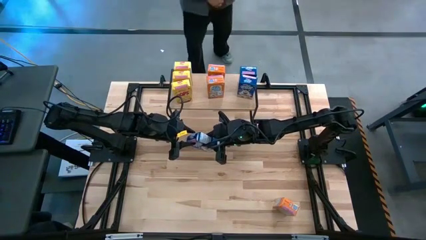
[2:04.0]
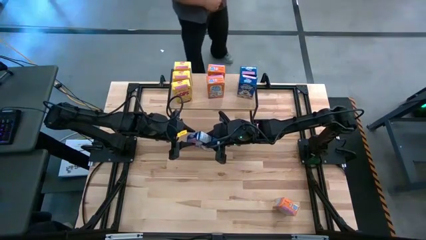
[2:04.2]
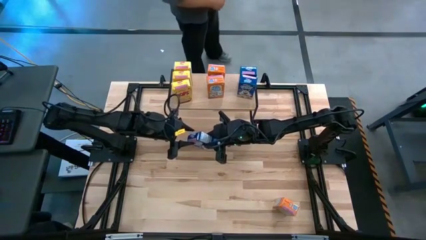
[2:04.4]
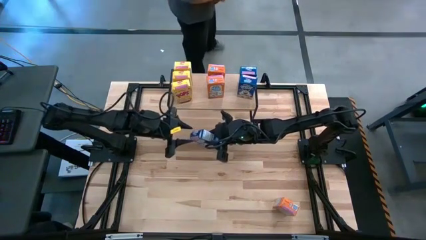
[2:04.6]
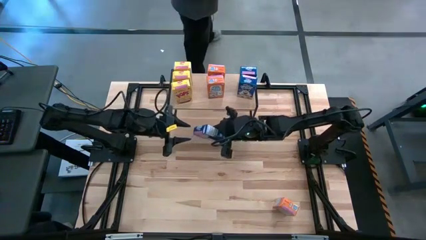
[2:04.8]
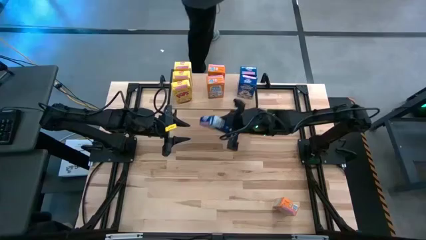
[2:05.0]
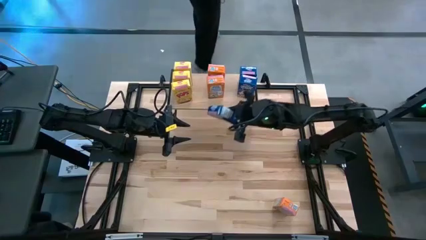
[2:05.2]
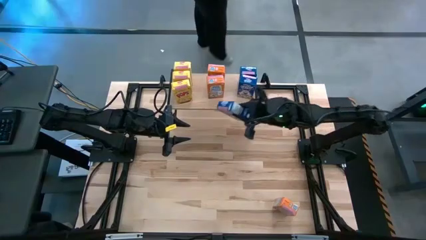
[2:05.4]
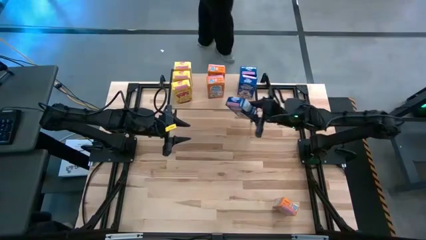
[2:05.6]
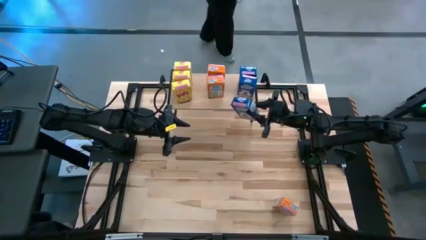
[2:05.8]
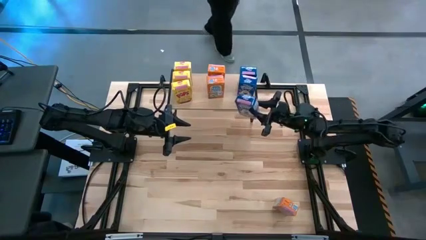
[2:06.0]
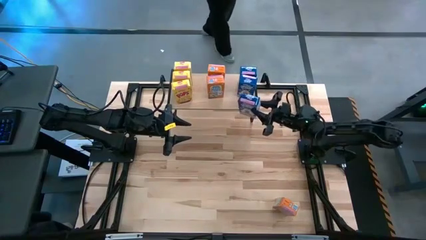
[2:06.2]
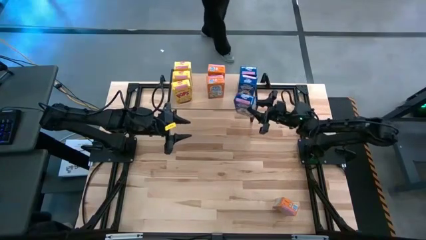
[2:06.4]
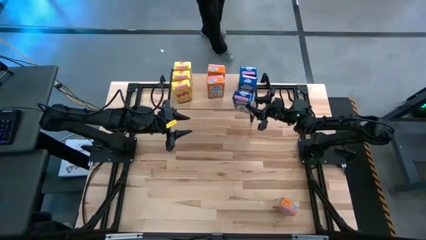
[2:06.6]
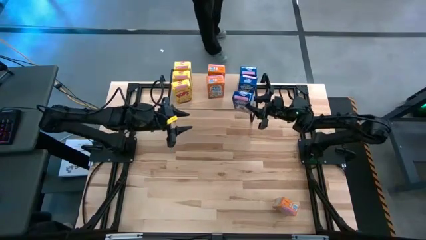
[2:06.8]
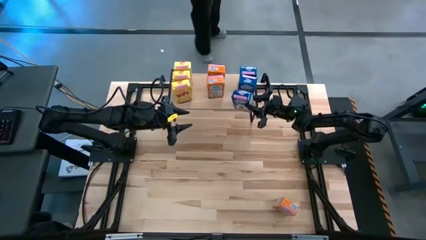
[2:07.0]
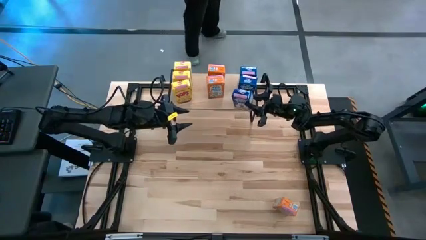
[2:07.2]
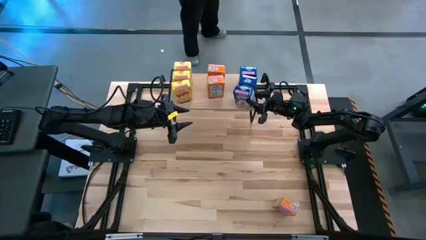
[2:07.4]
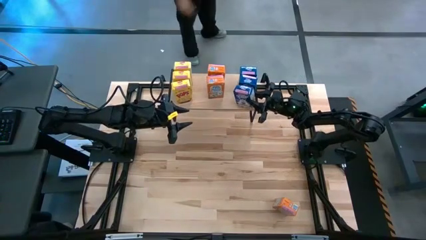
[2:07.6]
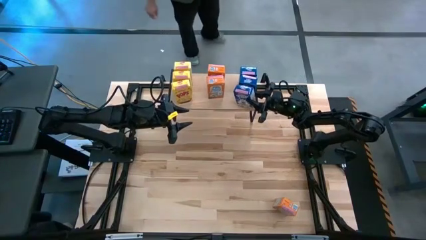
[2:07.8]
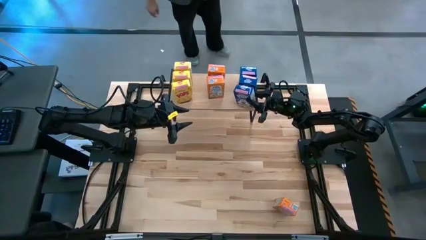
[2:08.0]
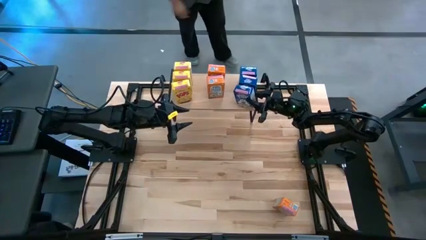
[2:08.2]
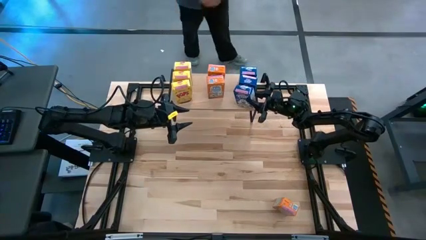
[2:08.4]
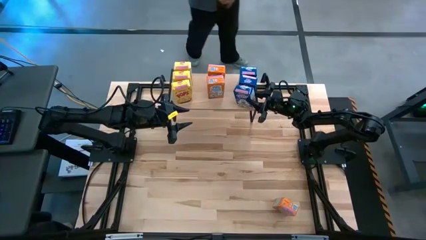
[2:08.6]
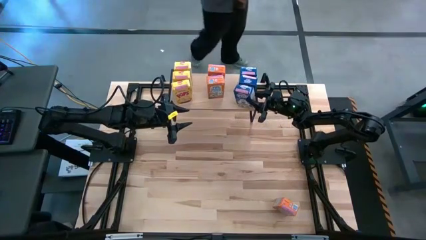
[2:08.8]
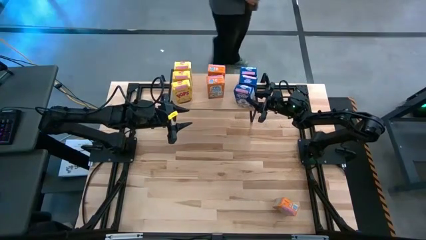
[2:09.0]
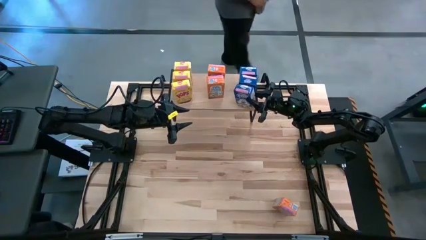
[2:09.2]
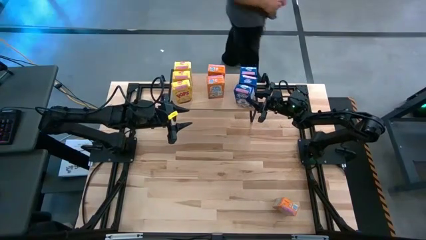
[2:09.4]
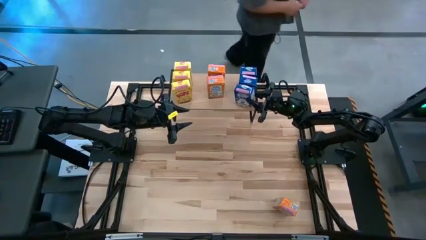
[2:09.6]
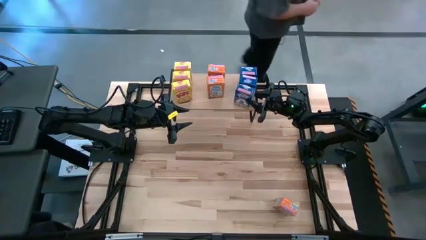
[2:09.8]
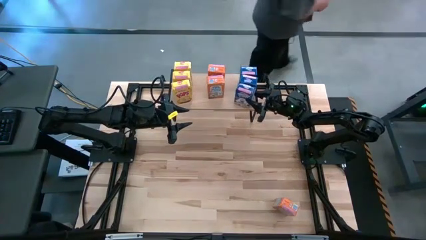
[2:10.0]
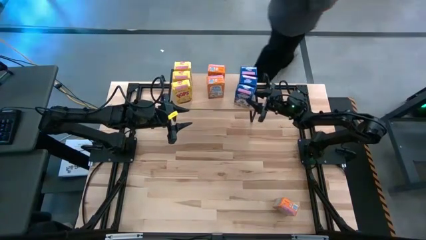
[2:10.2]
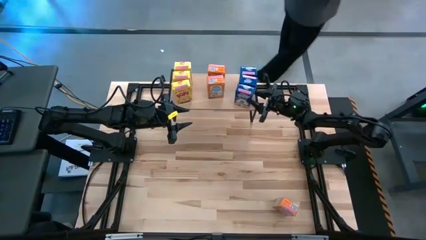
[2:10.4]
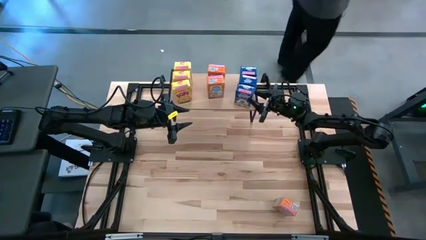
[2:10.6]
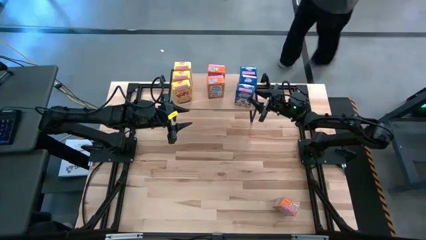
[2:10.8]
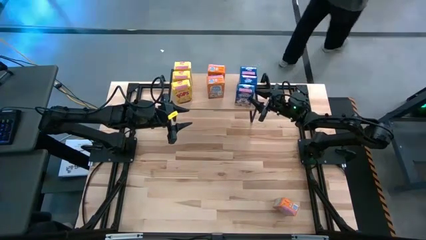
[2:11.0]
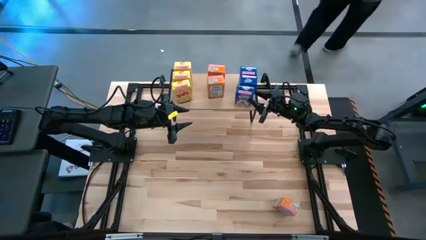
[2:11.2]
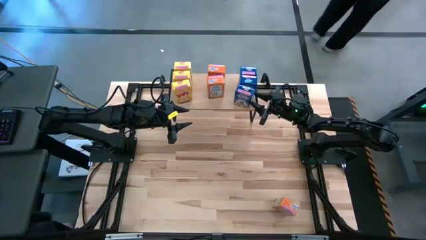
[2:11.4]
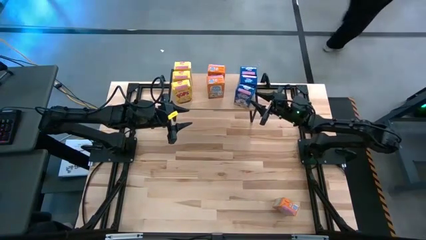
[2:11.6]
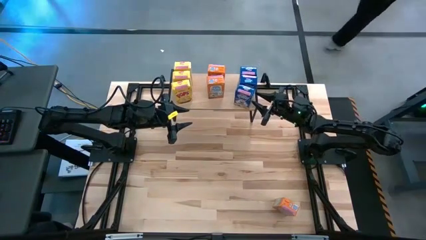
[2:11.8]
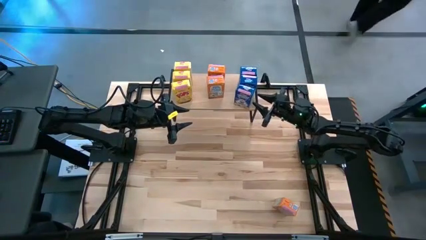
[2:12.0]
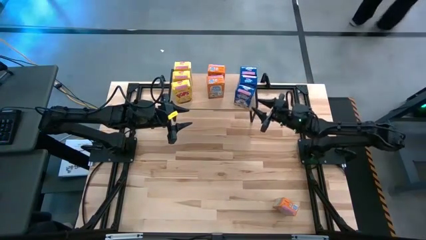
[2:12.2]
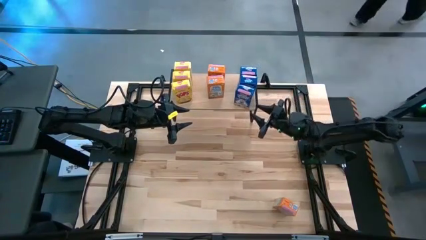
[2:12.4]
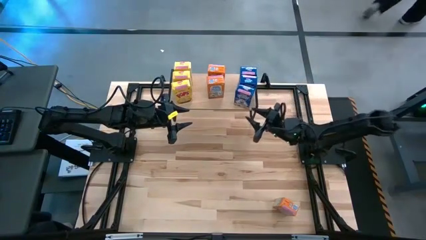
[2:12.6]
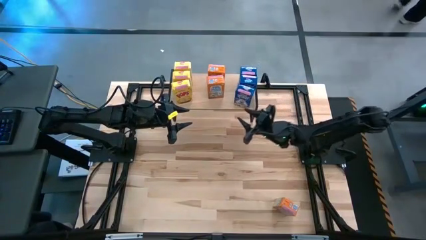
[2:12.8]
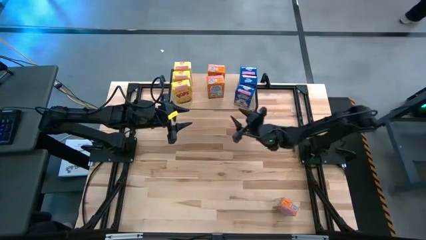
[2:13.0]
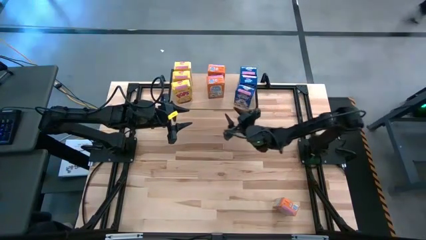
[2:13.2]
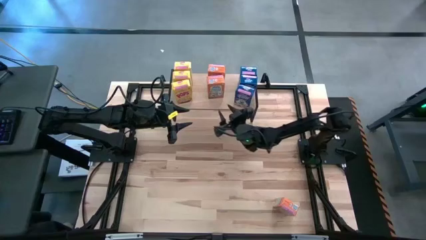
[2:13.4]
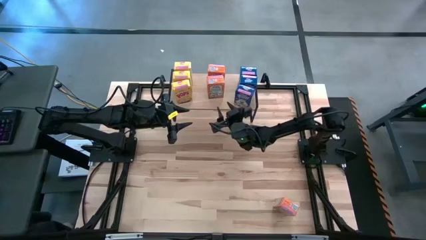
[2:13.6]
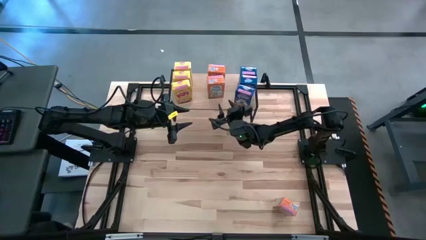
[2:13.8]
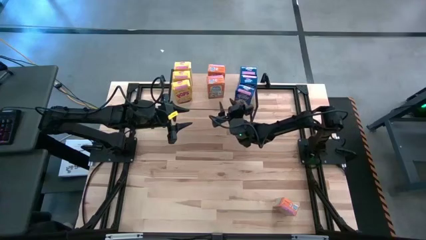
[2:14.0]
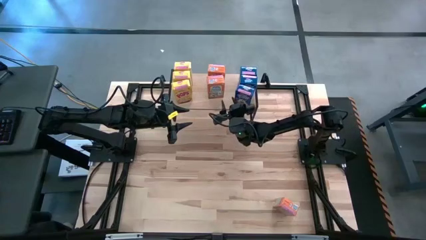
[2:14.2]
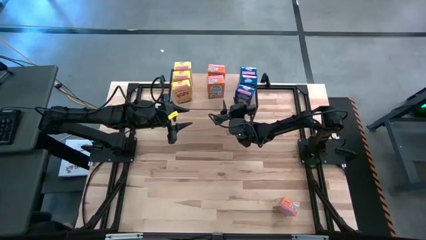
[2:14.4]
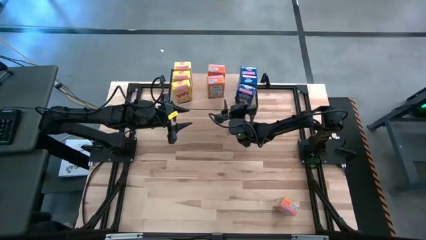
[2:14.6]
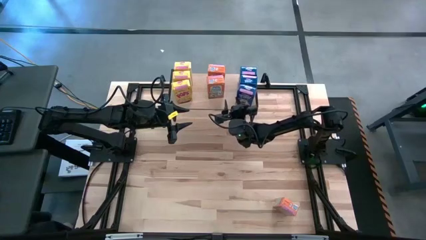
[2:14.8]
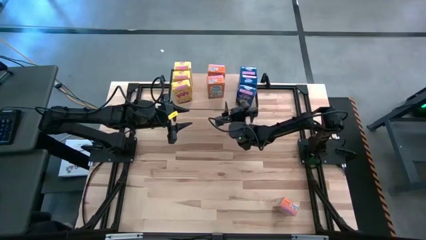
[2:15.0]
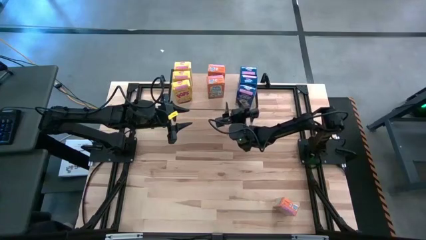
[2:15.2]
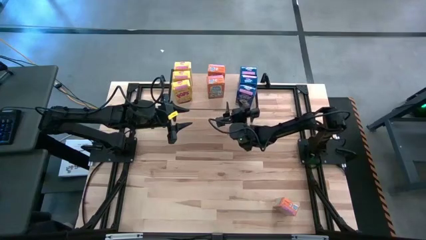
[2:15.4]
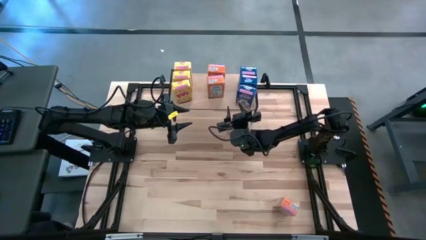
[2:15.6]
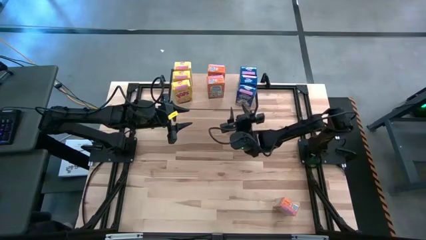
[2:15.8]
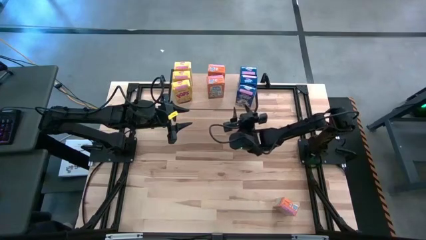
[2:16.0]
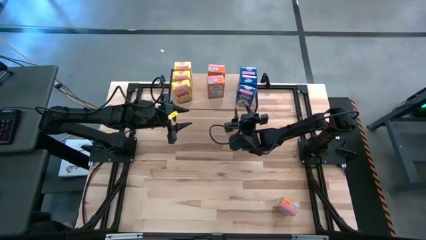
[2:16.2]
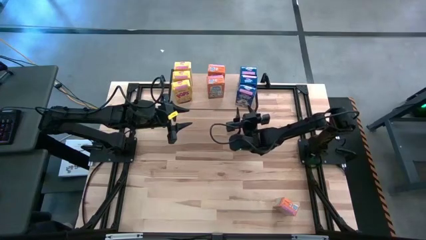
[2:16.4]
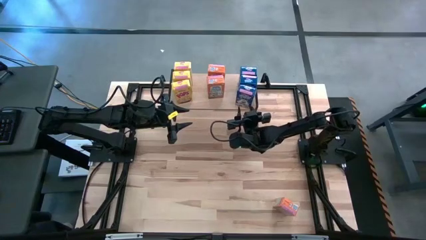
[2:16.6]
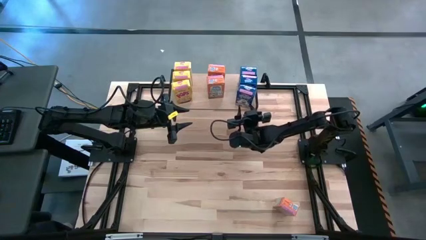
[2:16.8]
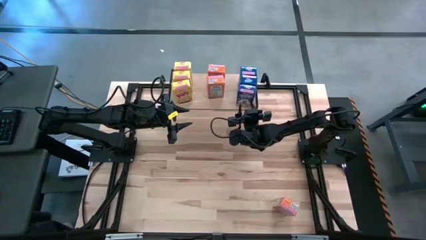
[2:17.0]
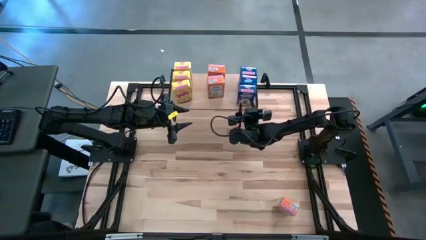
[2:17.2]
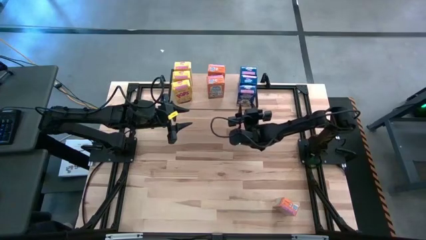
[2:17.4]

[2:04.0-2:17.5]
Task: Stack cereal on shelf
Put the blue cereal box on the shelf aligned with the other blue cereal boxes
